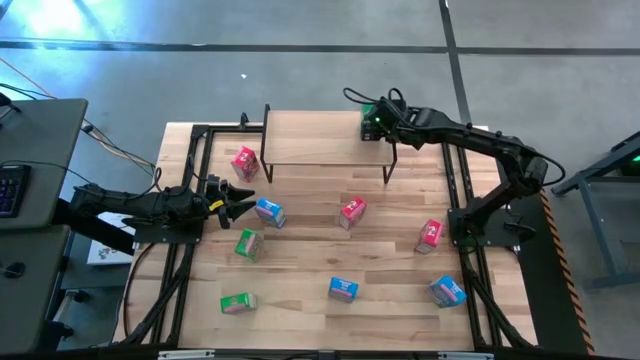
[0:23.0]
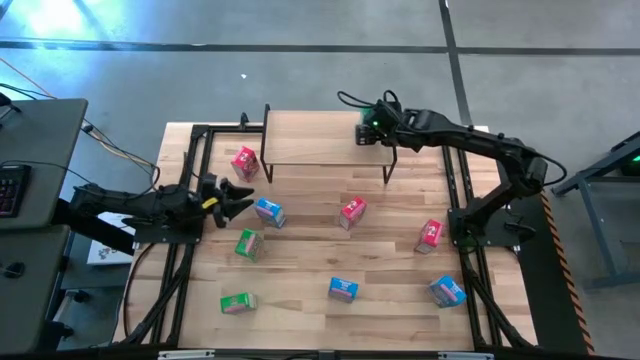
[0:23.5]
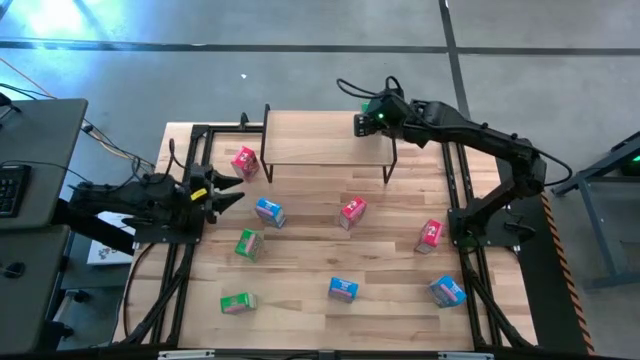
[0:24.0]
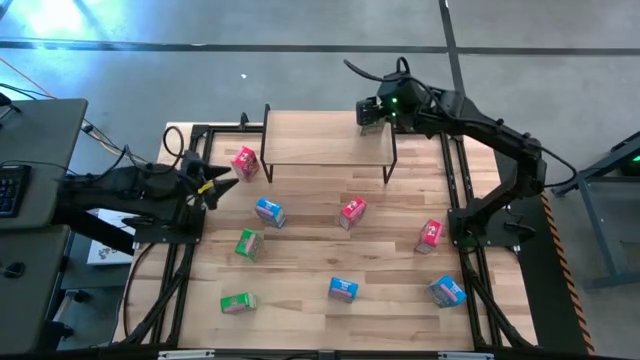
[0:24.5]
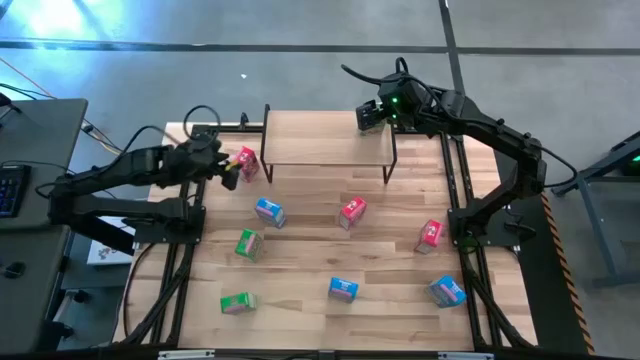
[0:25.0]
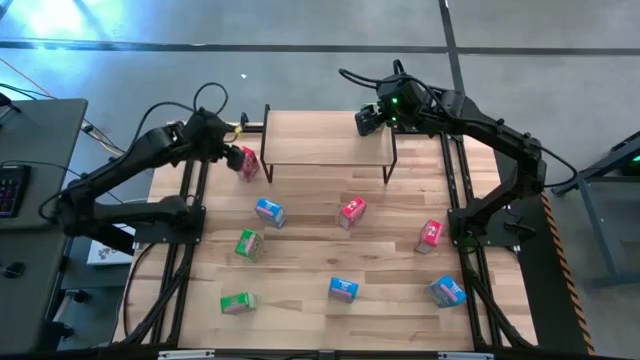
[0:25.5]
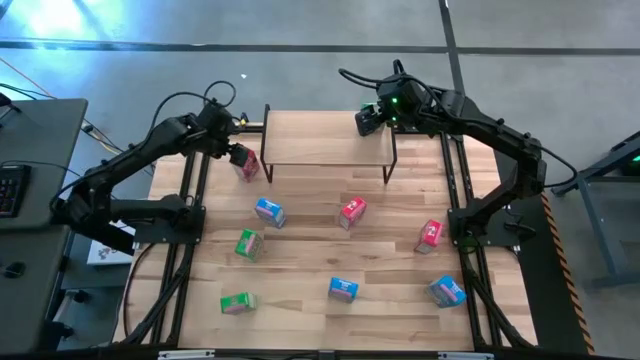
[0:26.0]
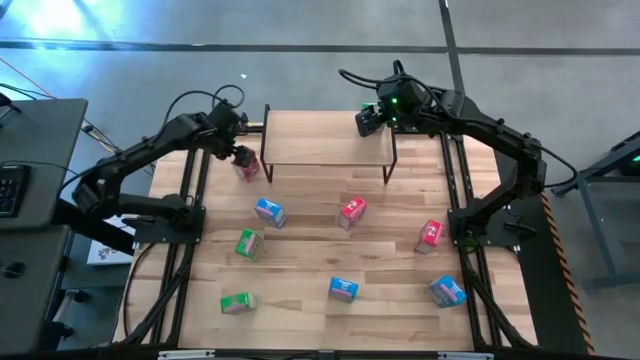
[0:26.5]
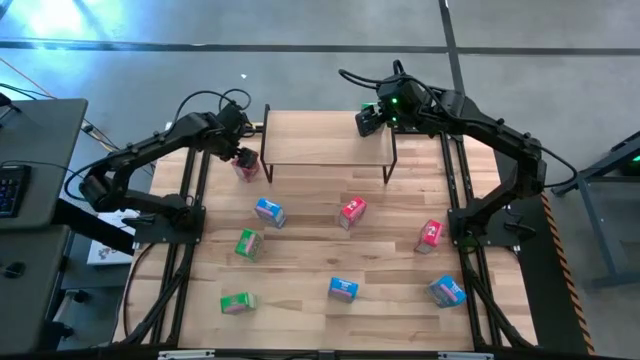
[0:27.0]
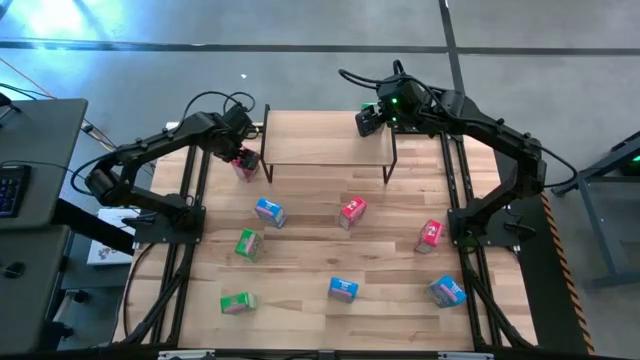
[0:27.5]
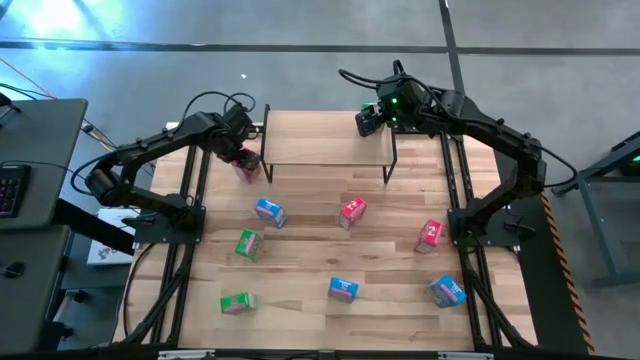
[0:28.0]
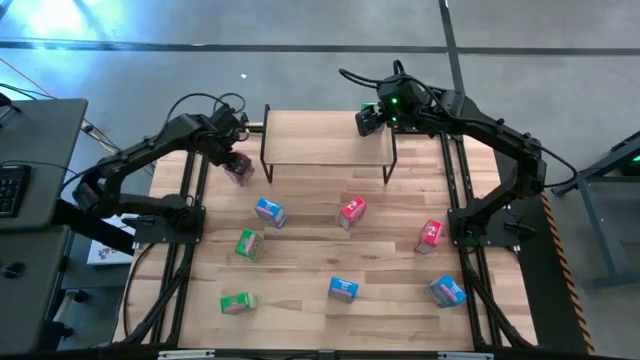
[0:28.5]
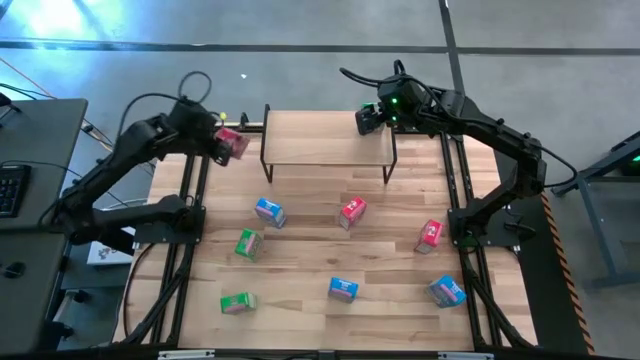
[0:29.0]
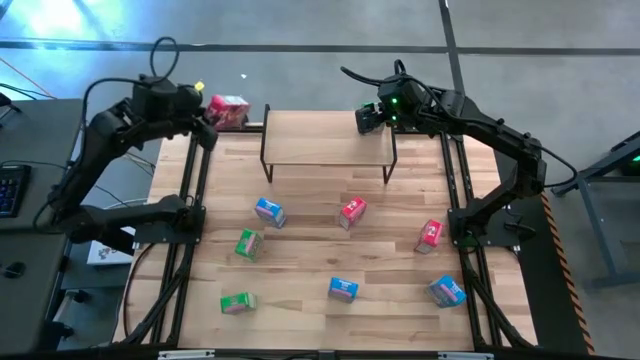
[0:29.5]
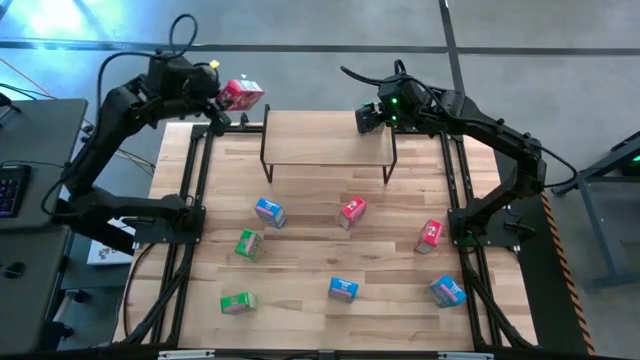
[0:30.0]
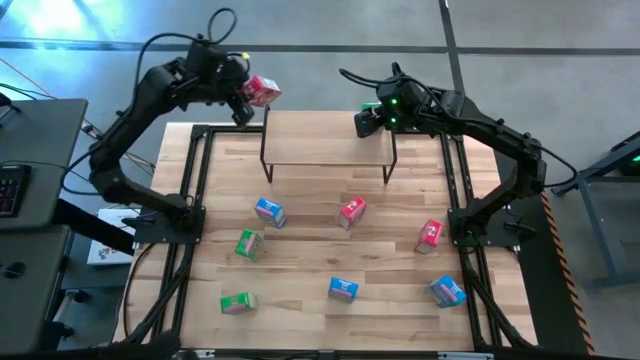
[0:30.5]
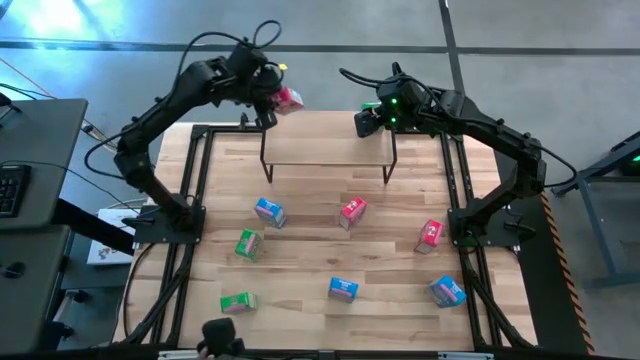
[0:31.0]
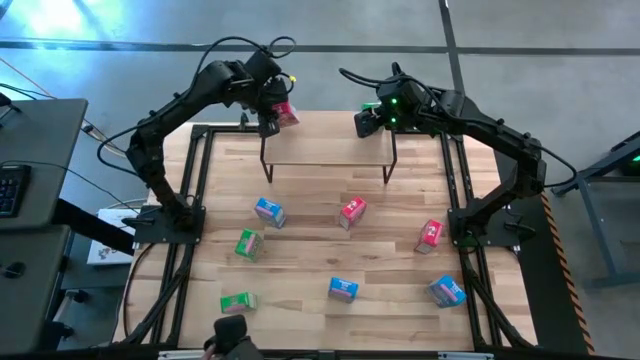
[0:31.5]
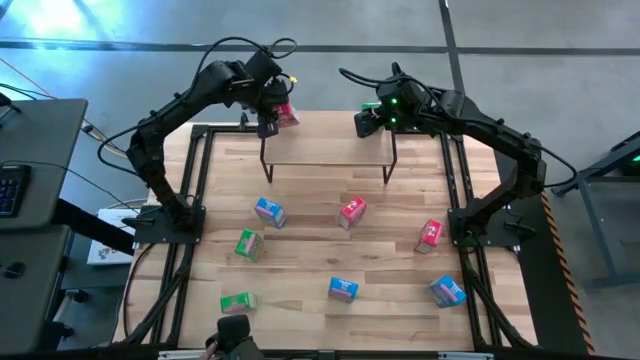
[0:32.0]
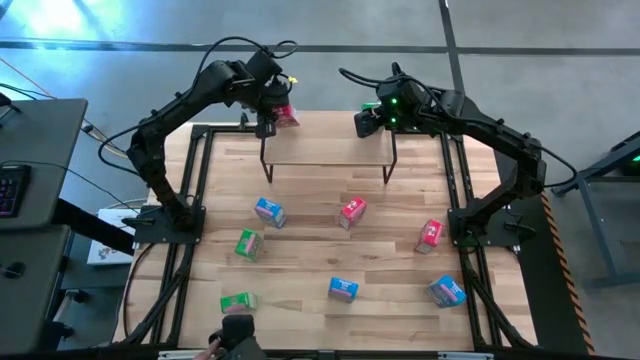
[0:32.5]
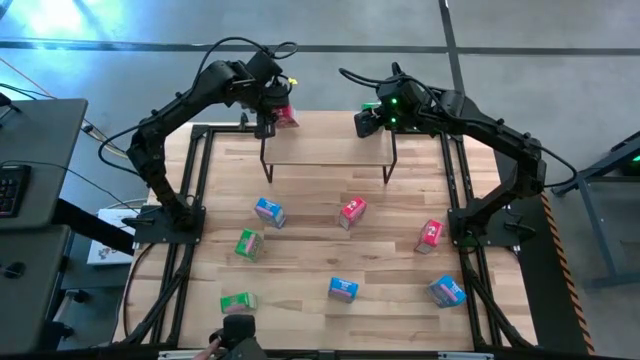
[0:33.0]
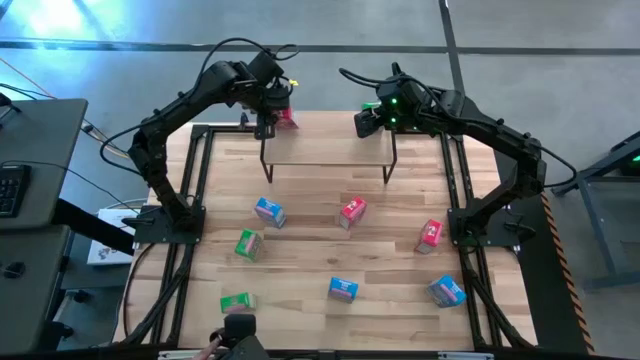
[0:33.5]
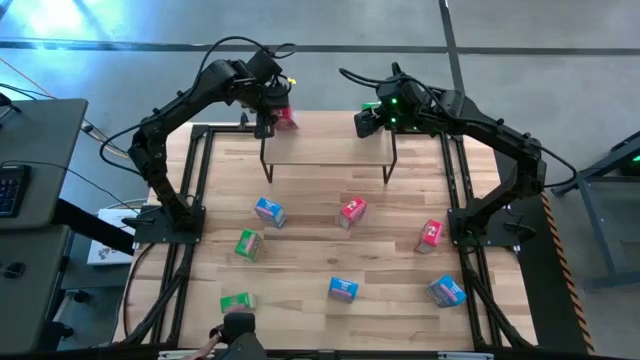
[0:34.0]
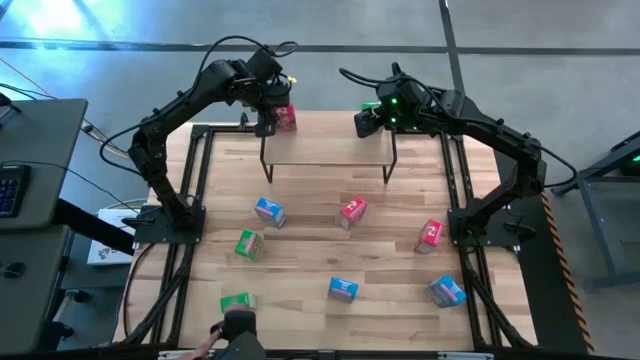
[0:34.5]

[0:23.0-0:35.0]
Task: Stack cereal on shelf
Put the left red cereal box on the shelf

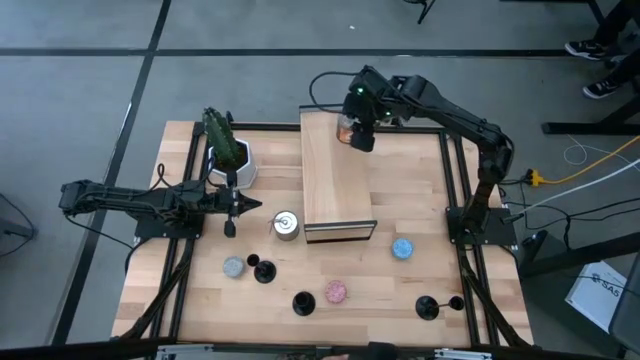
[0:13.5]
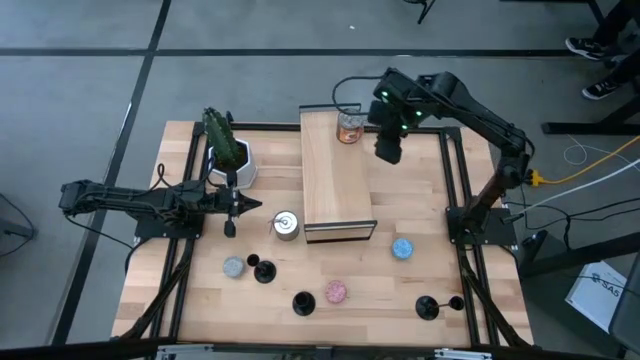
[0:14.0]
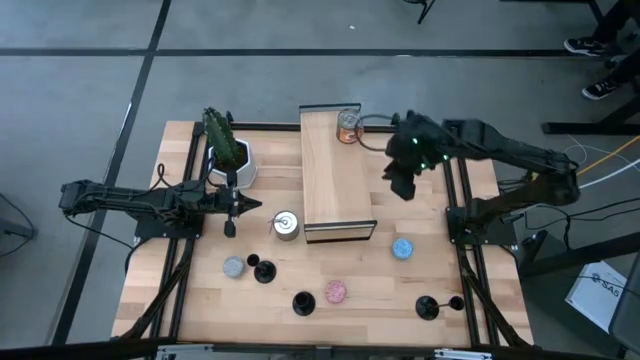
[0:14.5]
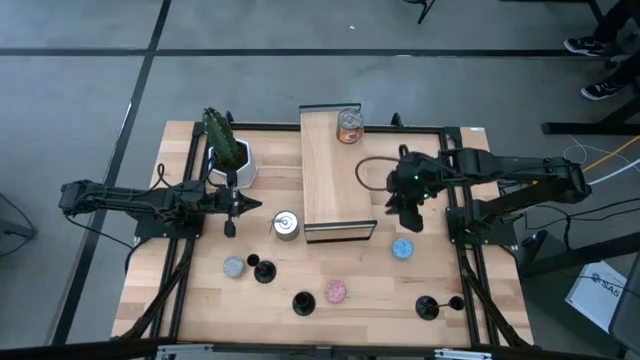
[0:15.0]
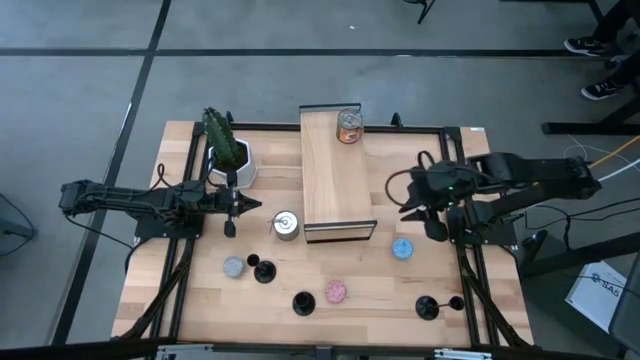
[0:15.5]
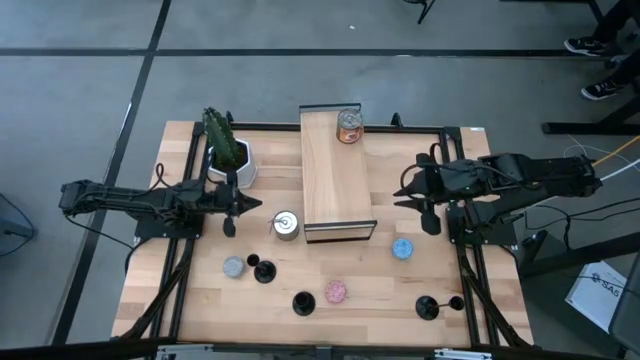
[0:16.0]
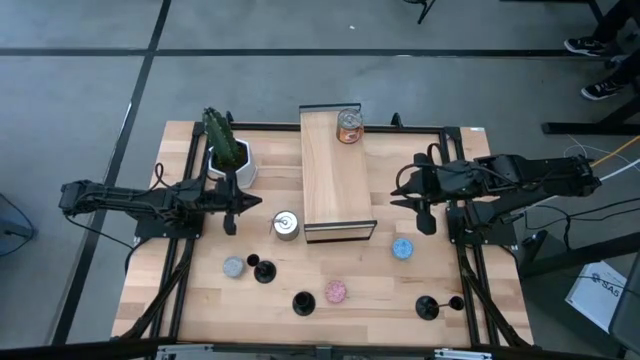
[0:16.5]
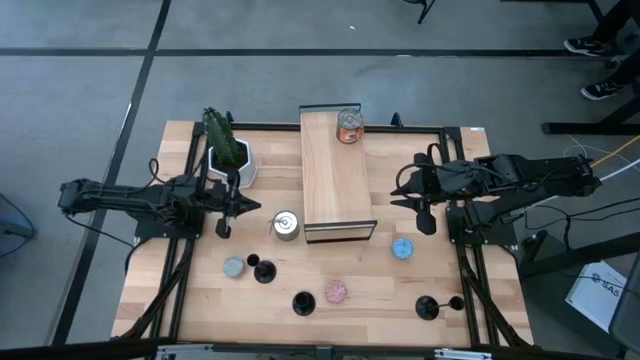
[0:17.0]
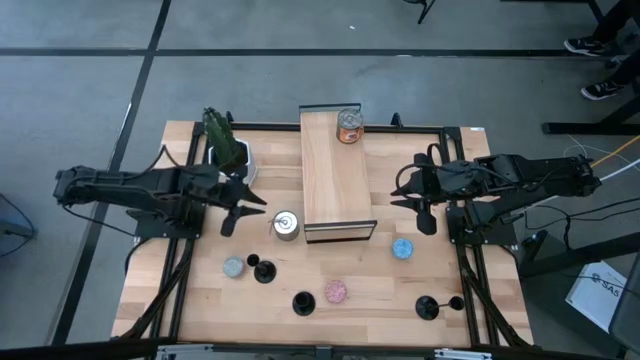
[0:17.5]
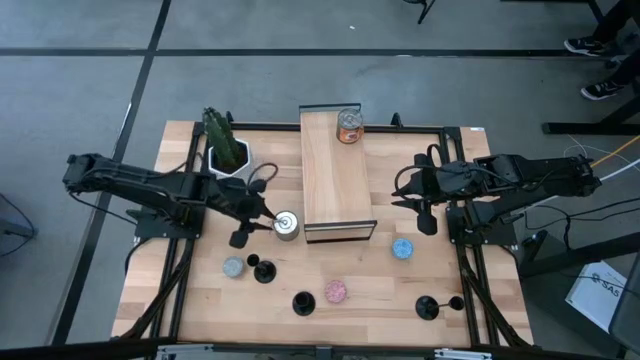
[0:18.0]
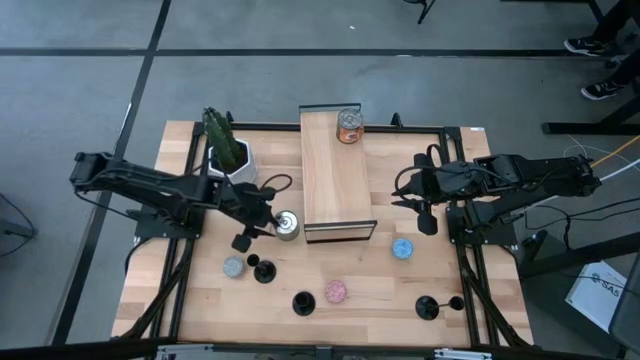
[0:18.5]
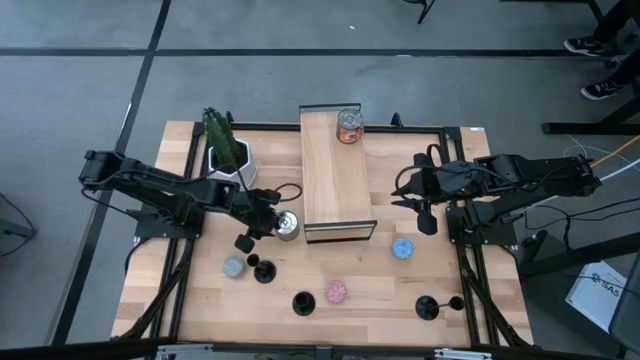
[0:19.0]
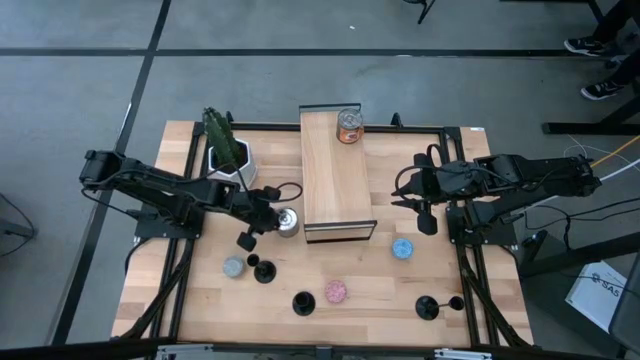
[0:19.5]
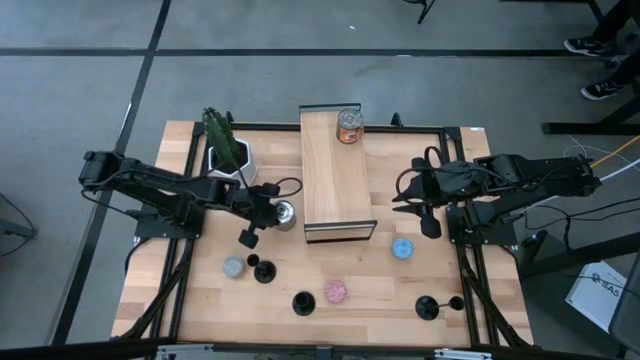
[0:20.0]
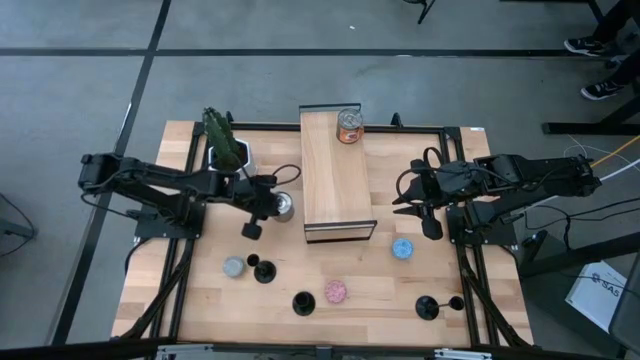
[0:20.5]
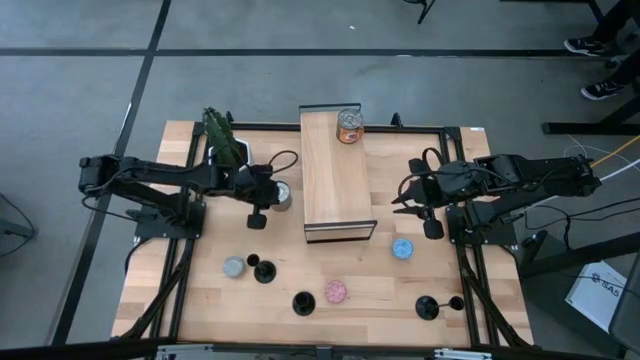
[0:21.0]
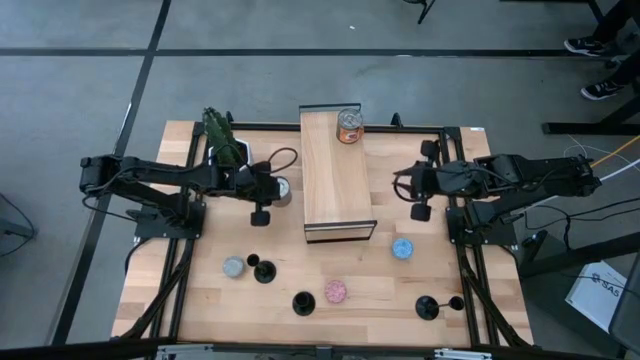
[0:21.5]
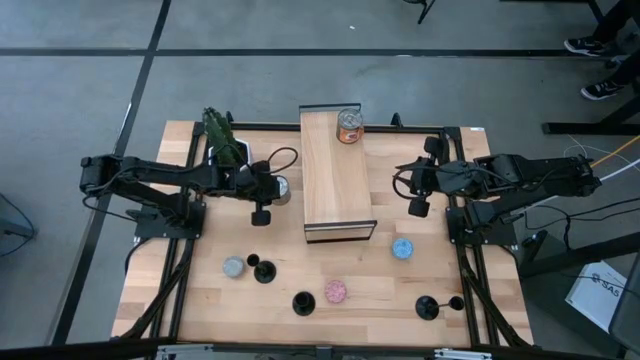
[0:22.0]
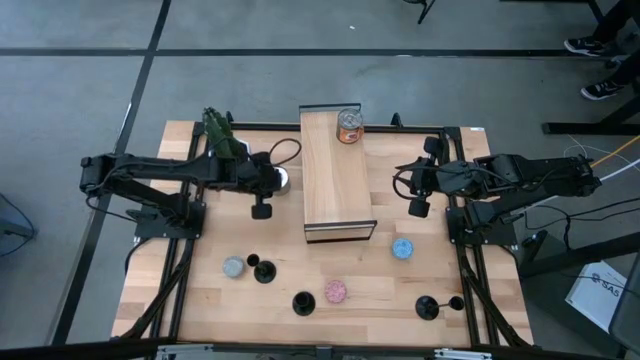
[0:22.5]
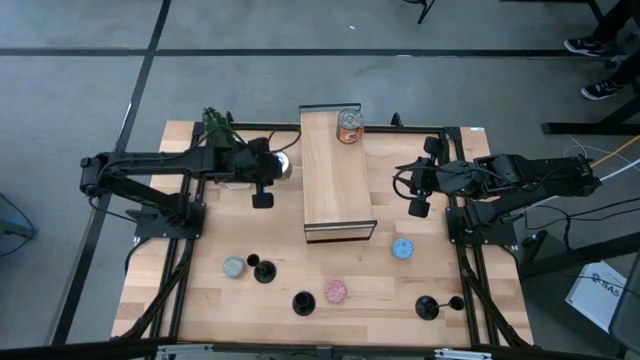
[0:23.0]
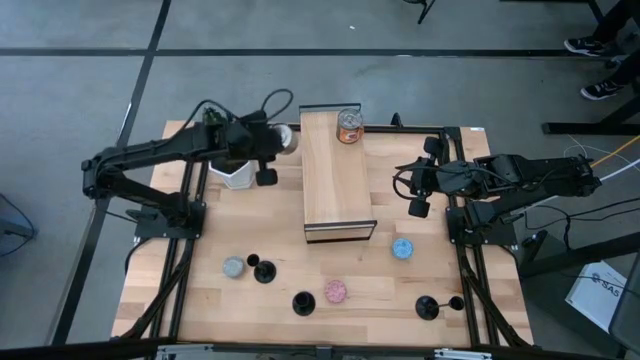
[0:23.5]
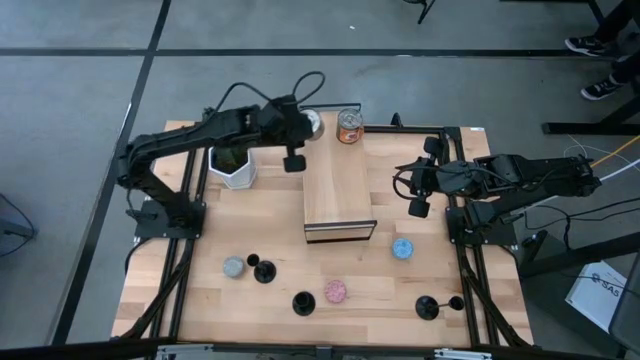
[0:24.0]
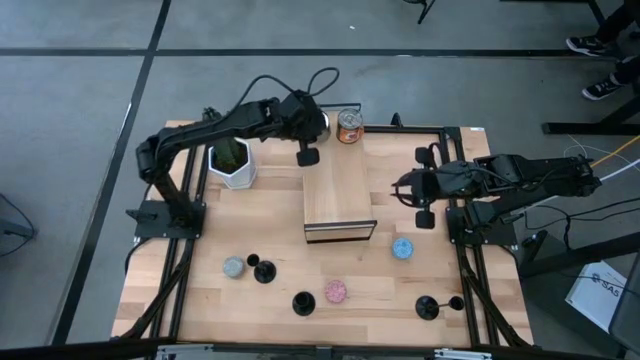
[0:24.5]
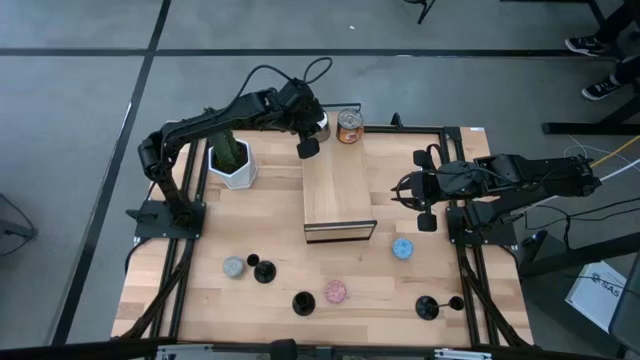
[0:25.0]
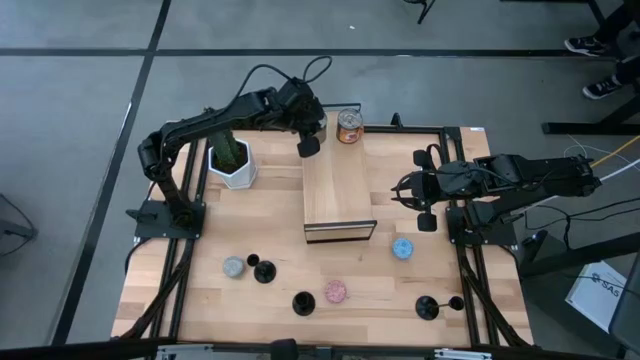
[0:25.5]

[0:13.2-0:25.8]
Task: Pick & Place candle stick holders
Put the large brown scented candle on the shelf
